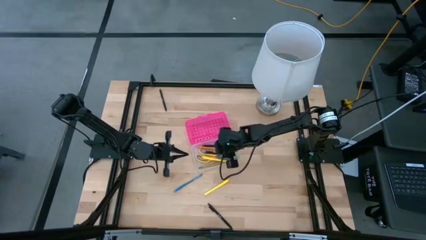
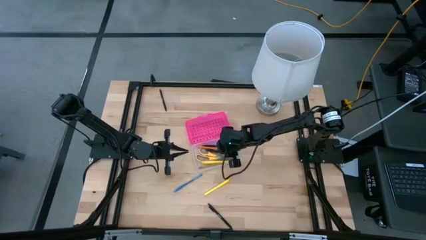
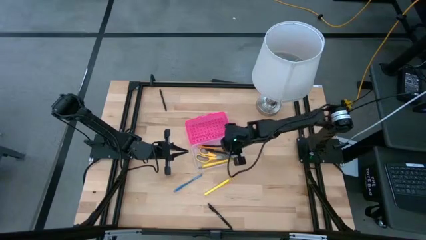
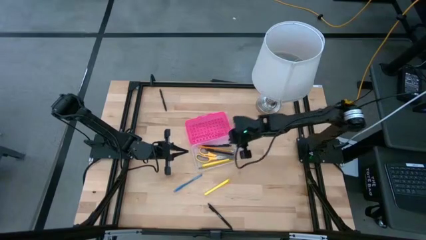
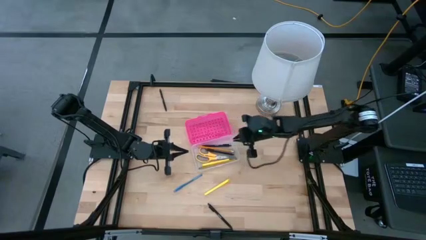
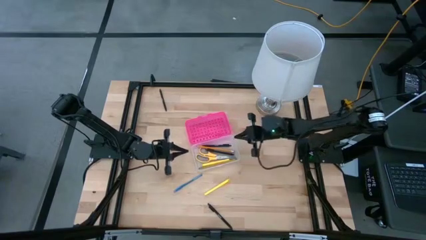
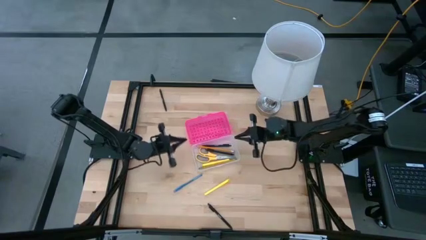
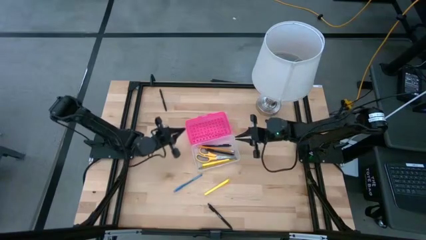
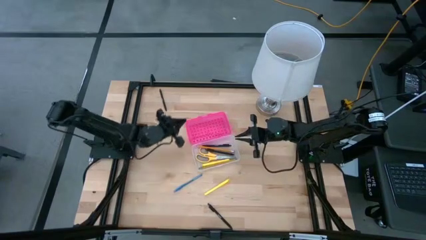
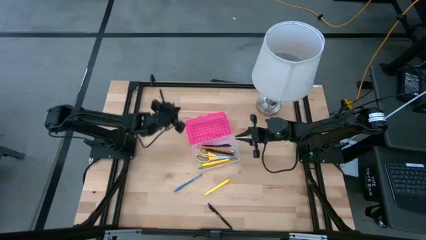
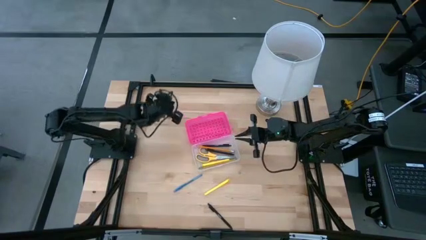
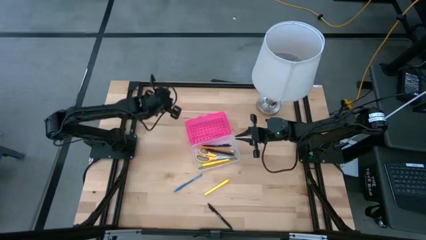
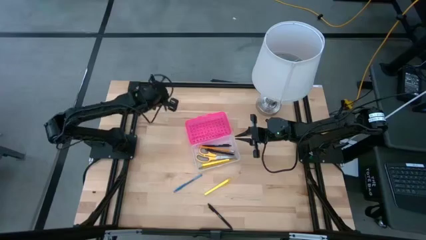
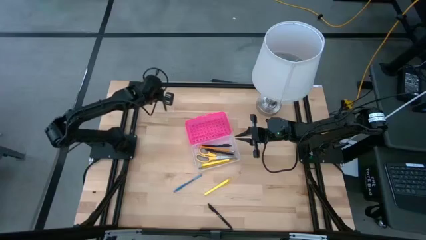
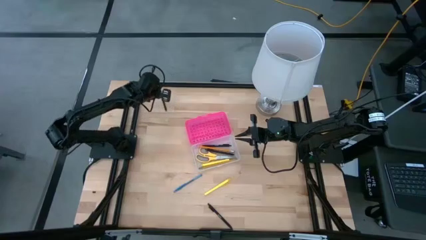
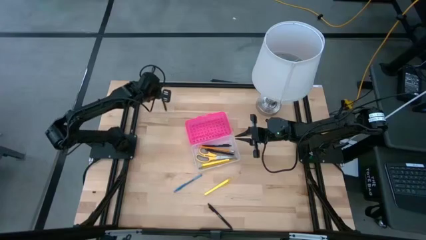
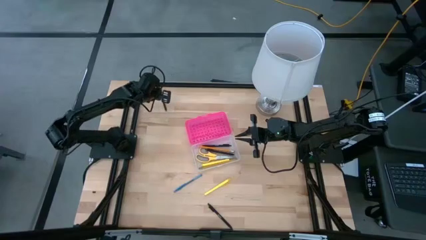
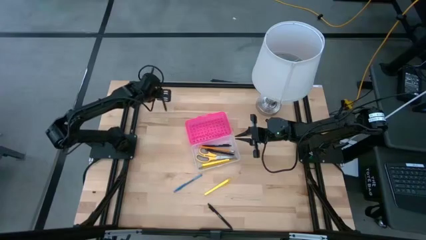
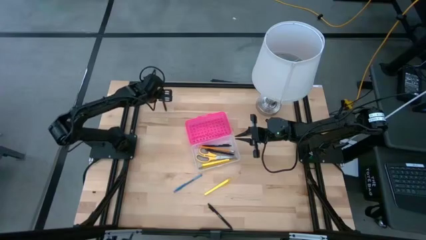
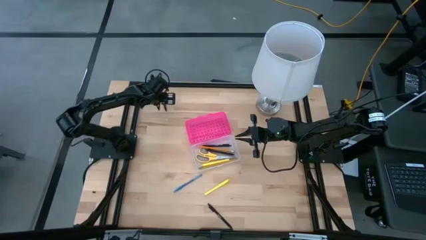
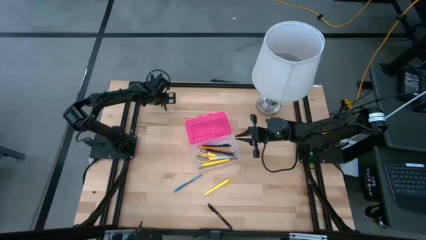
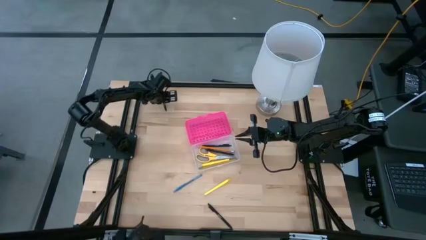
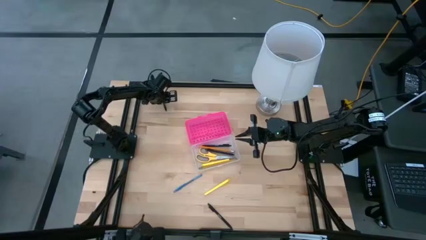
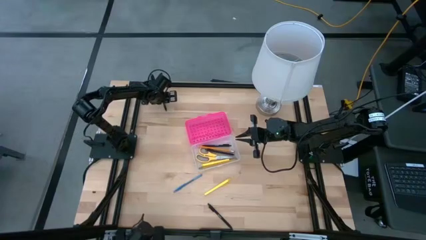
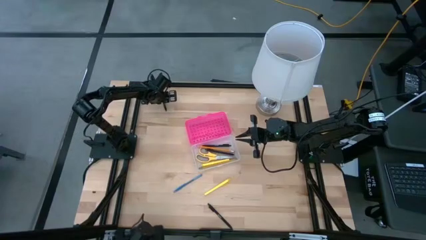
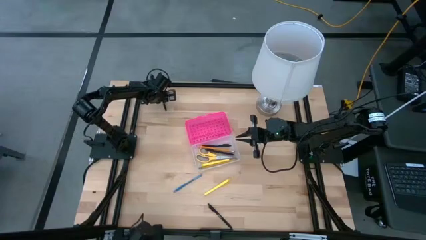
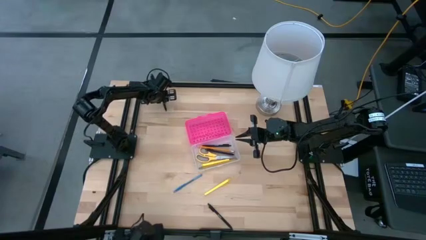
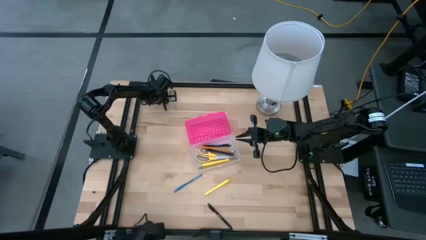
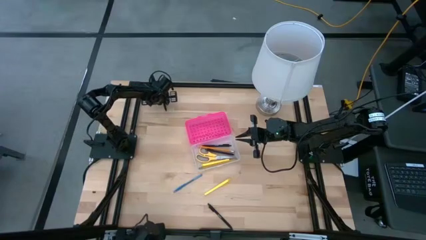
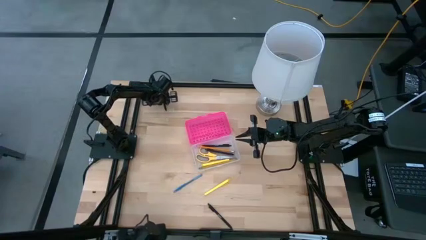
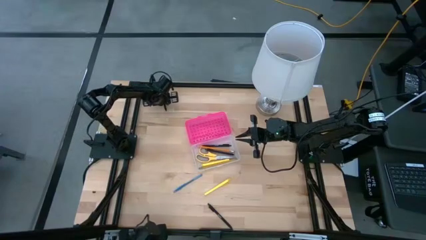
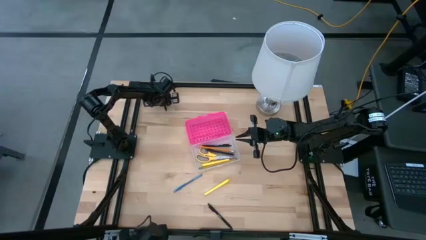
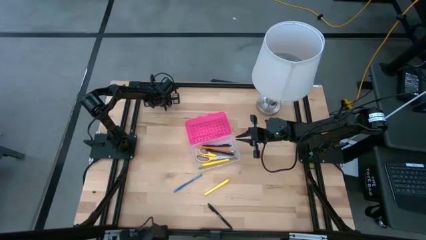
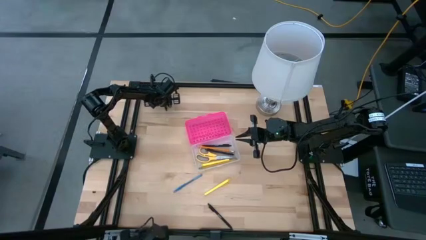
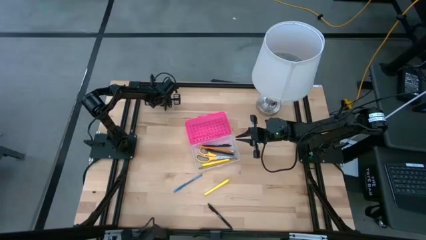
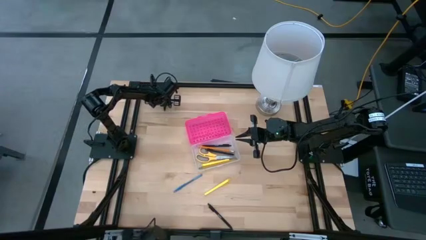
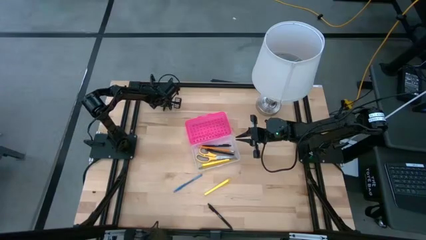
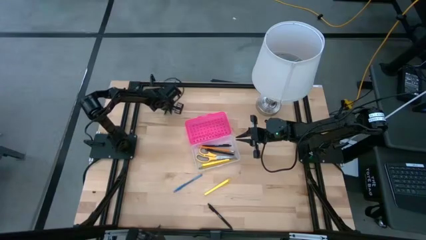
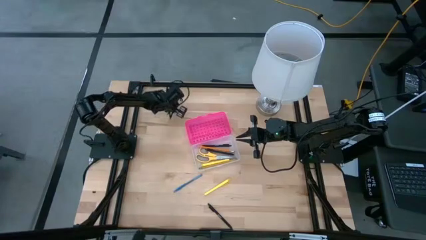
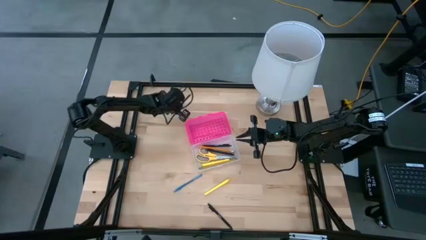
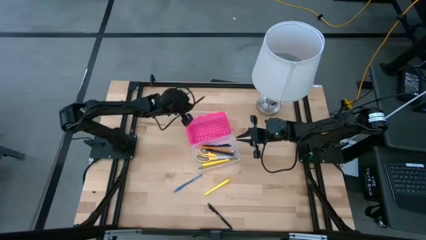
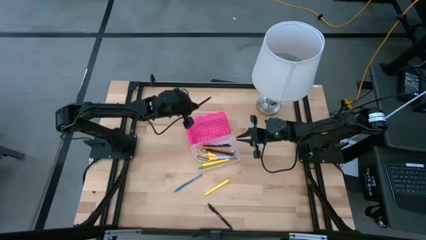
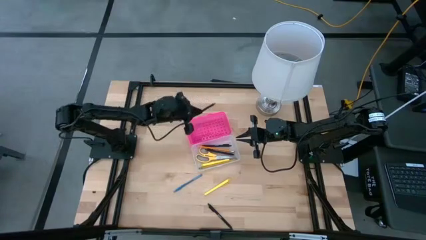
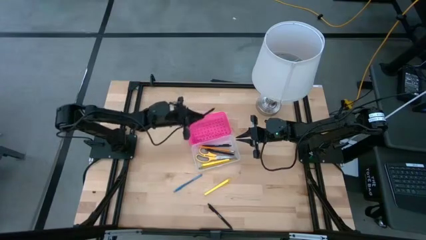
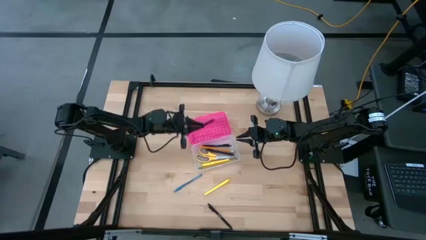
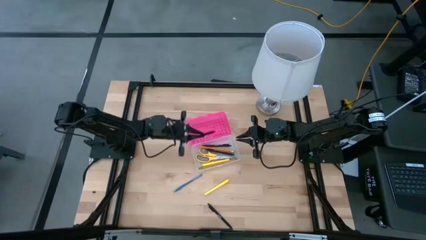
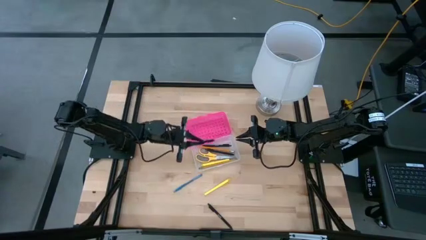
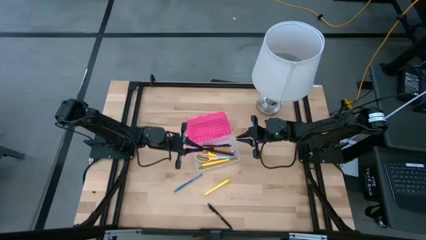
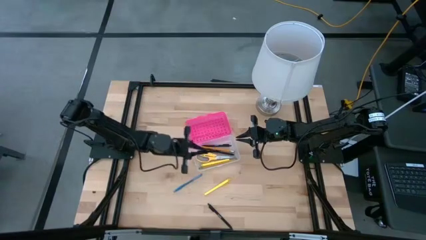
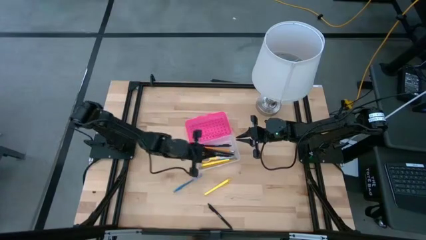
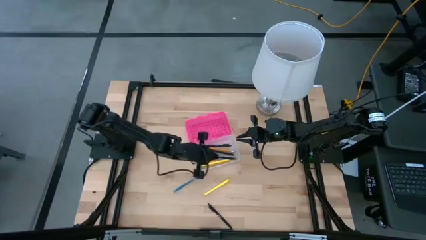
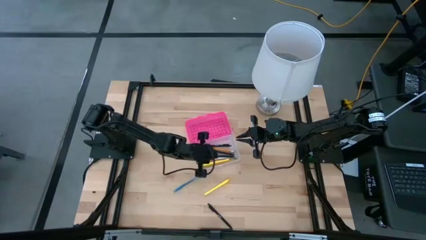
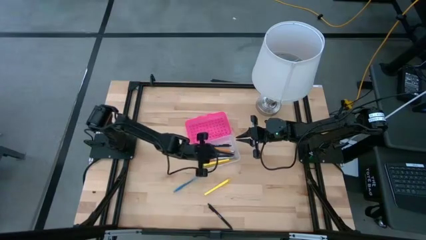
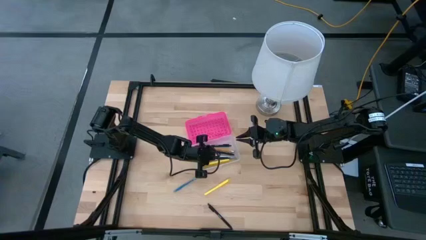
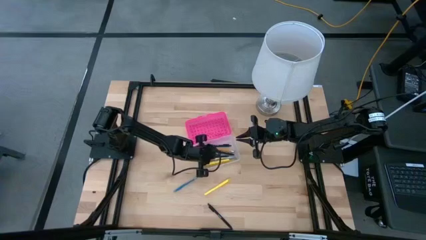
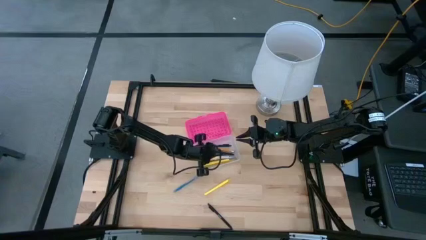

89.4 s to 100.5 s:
Task: Pick & place school supplies into a supply box
Put the black pen into the pink supply box

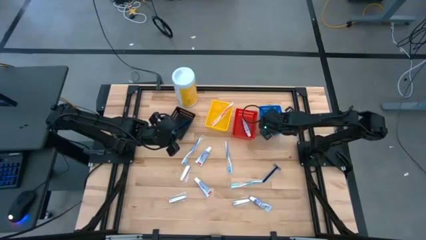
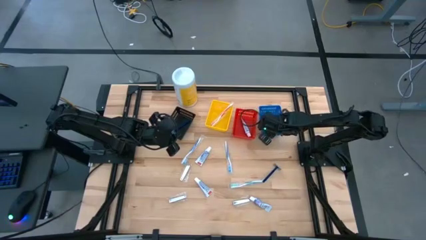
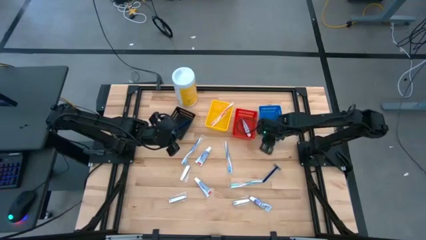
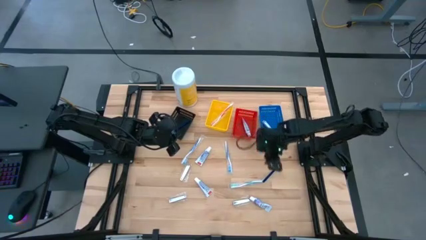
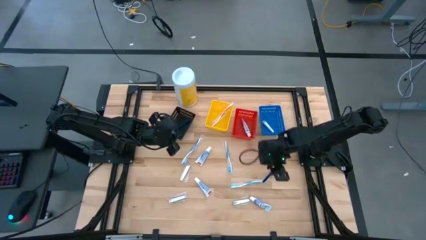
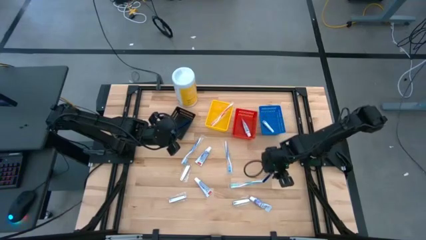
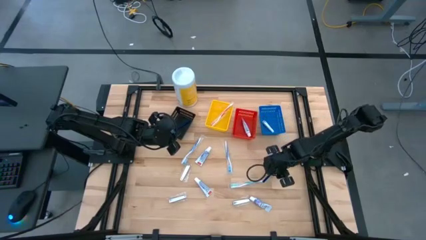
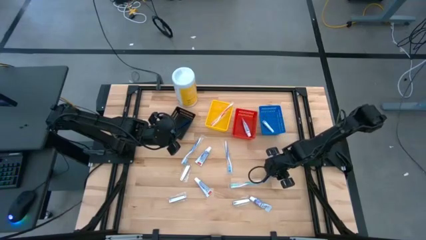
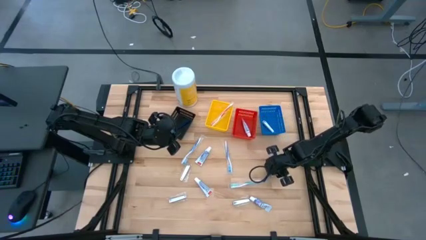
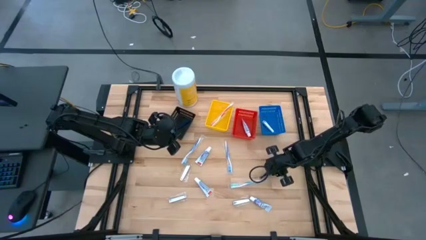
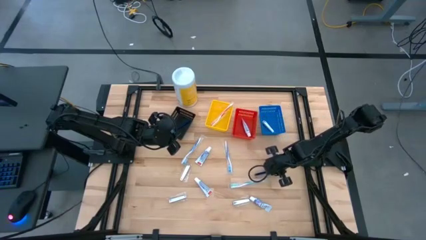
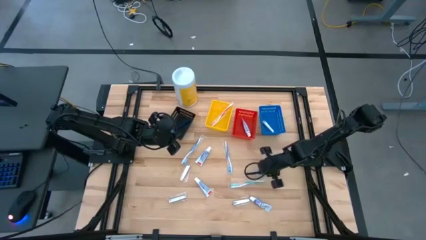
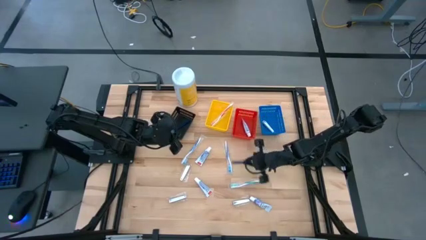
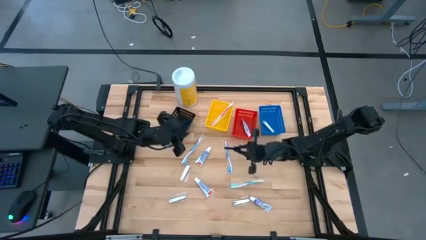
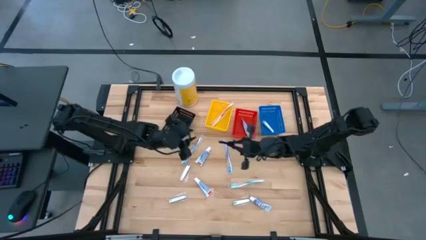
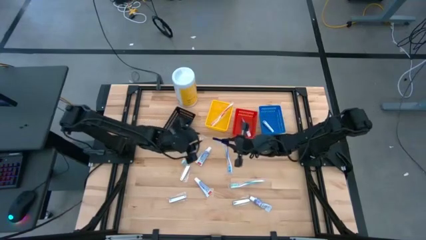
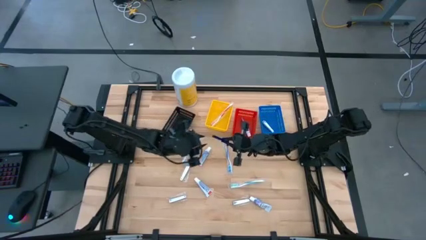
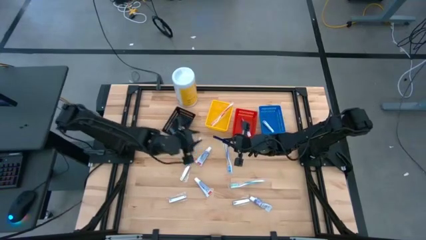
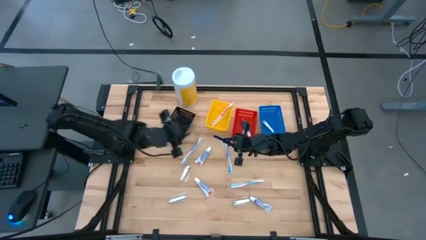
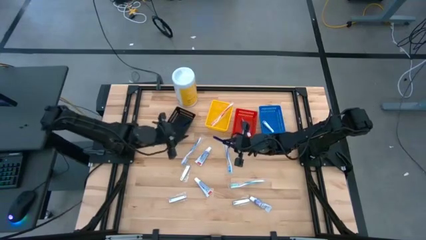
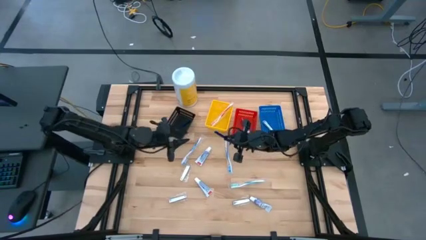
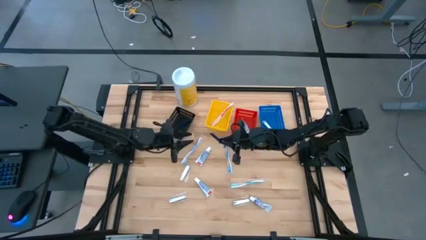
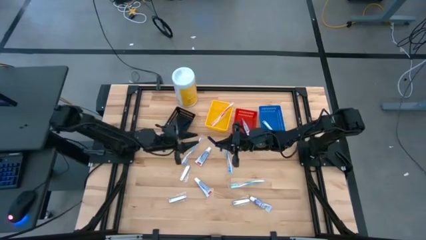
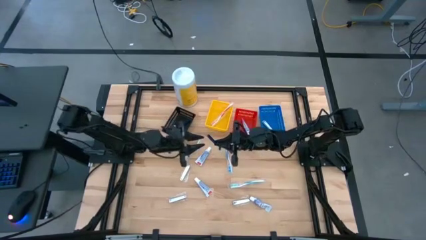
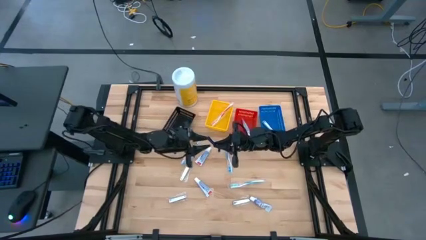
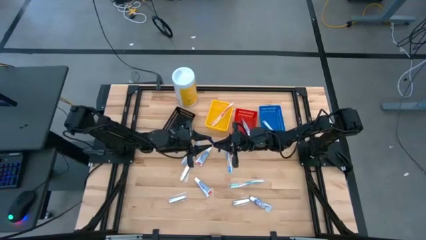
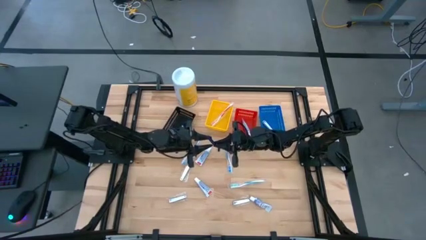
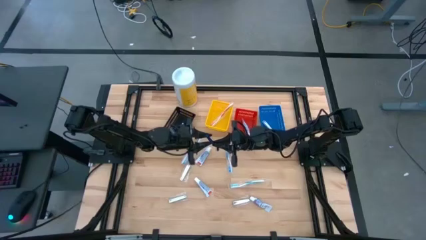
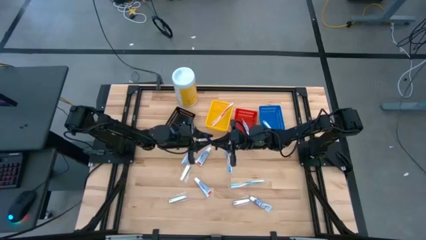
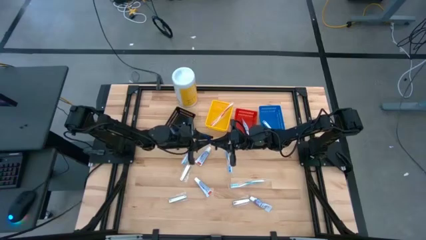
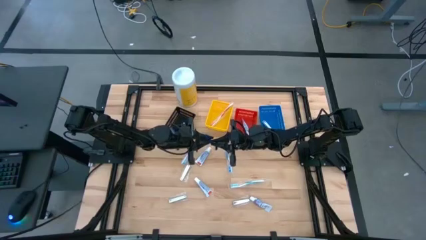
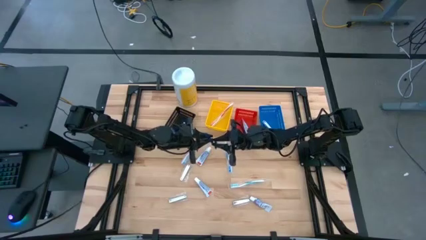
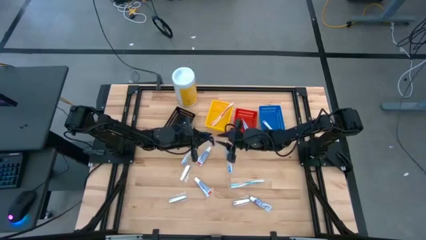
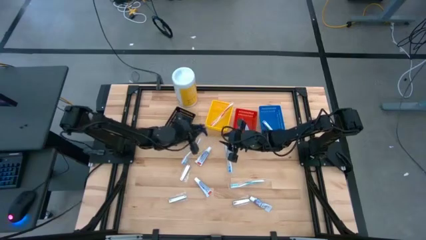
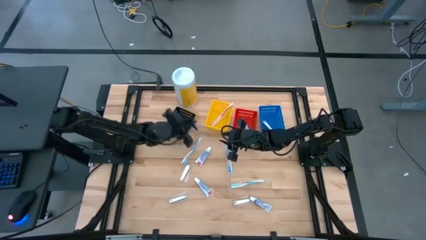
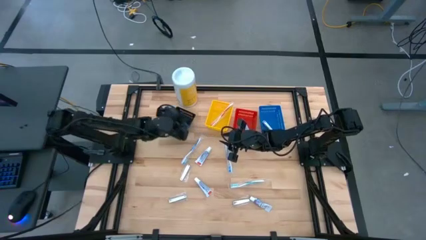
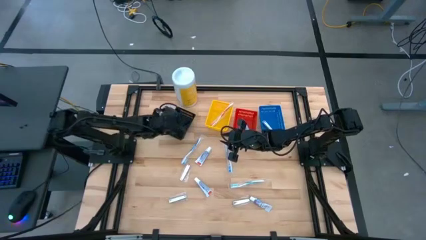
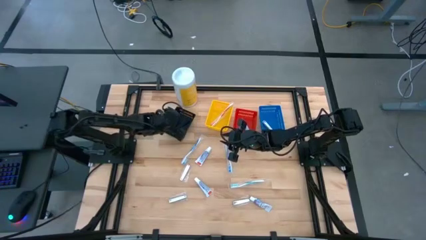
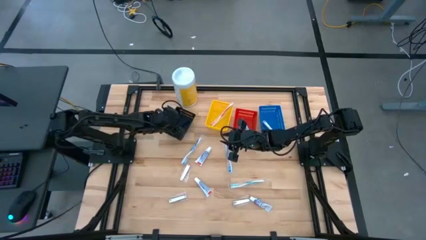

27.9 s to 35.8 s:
Task: Pick & Place Travel size toiletries
Put the blue razor into the black bin
